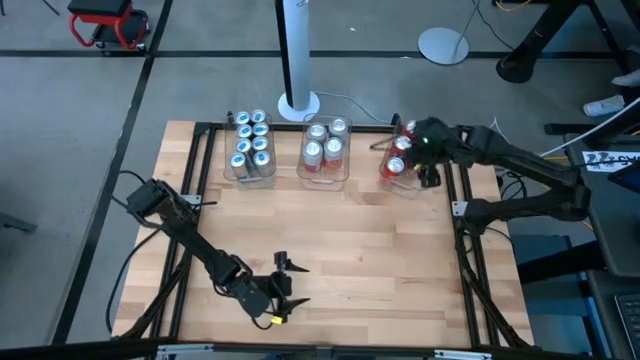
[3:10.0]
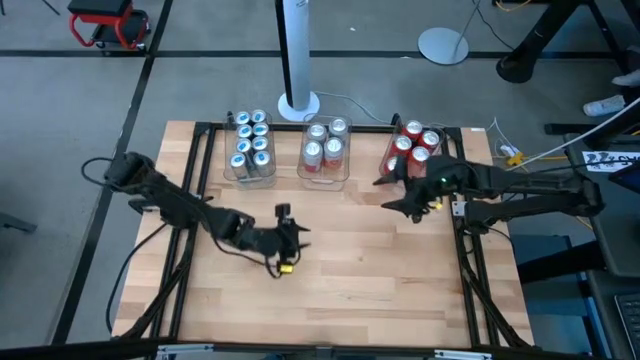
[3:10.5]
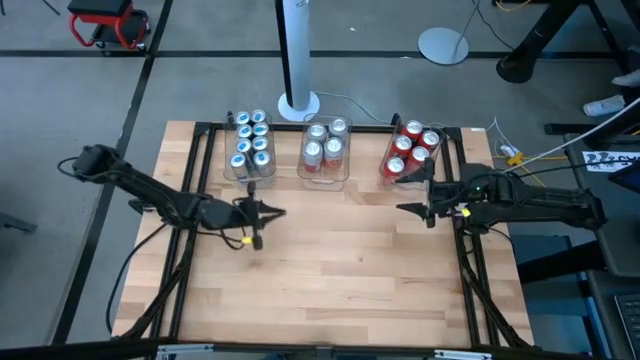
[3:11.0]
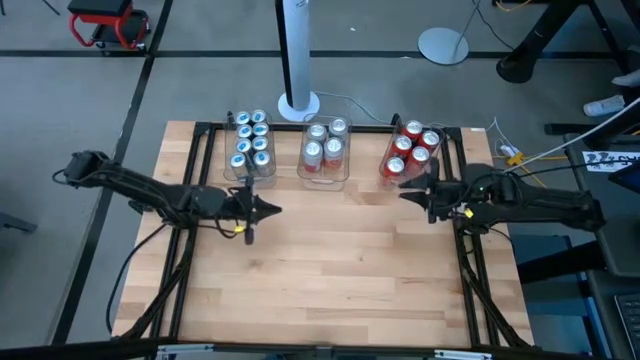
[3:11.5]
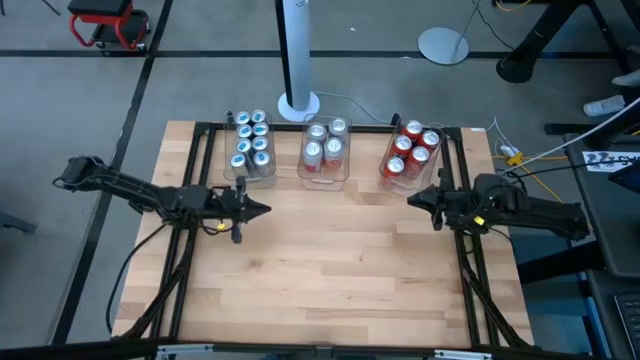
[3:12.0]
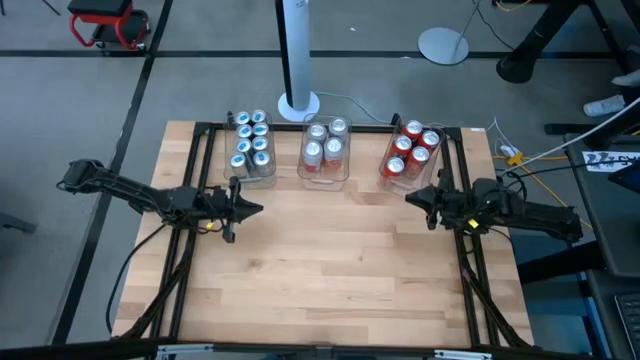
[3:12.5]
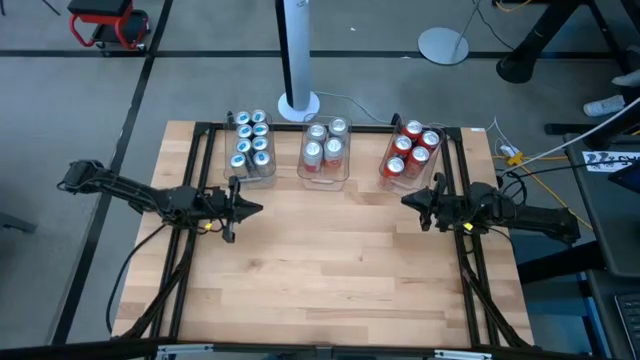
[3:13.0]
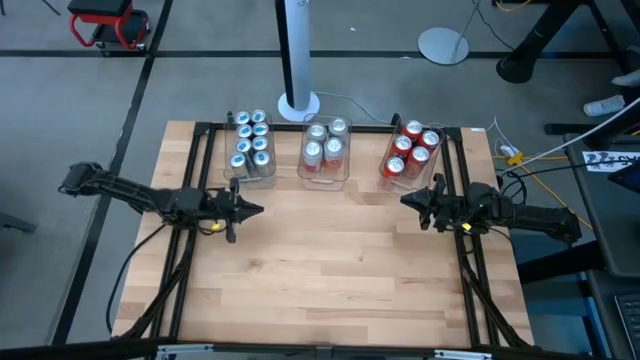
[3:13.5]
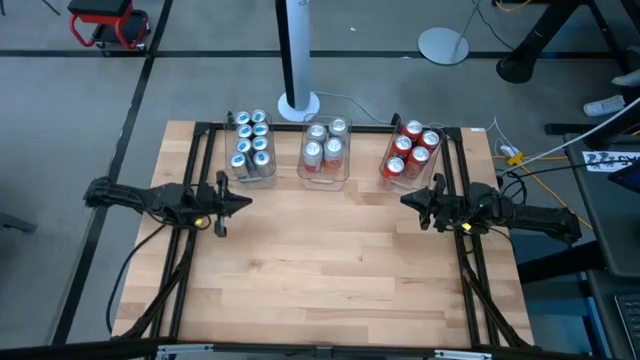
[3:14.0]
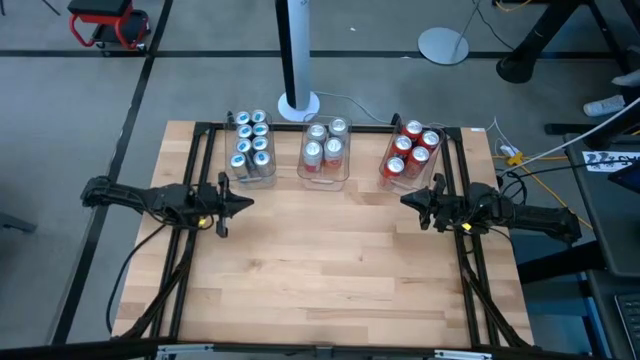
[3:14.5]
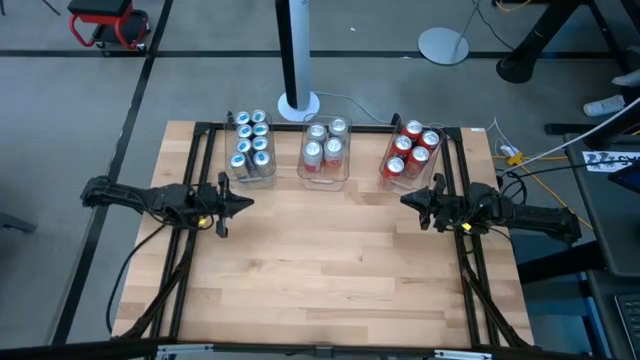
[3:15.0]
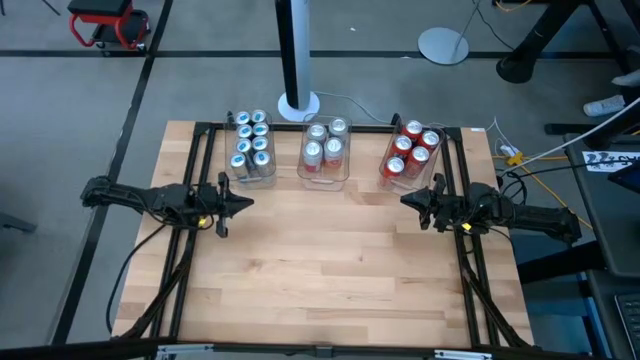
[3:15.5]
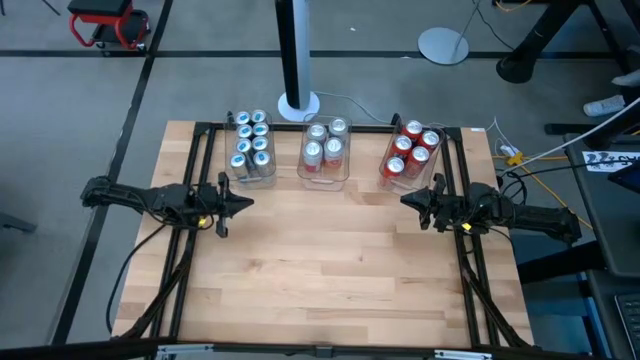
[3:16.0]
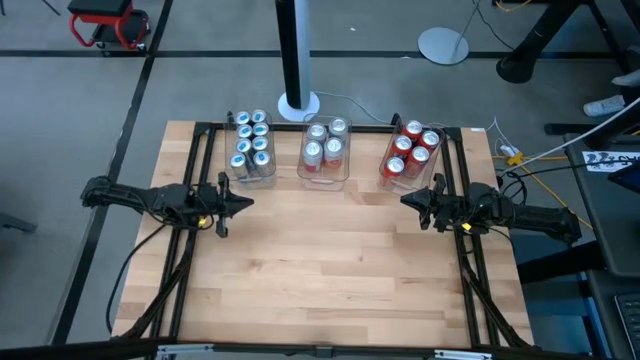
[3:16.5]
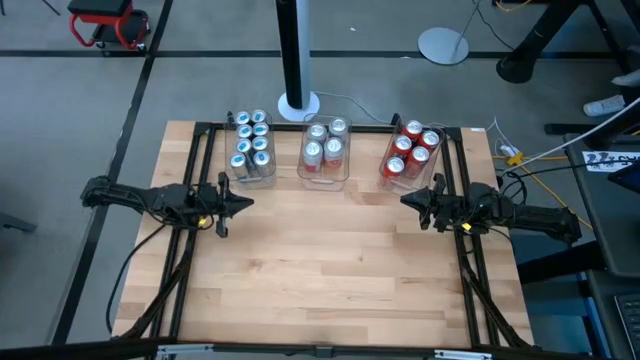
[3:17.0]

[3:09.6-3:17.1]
Task: Sort soda cans
Return to Home Position

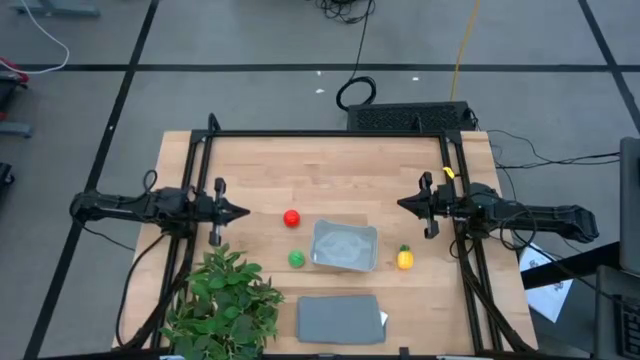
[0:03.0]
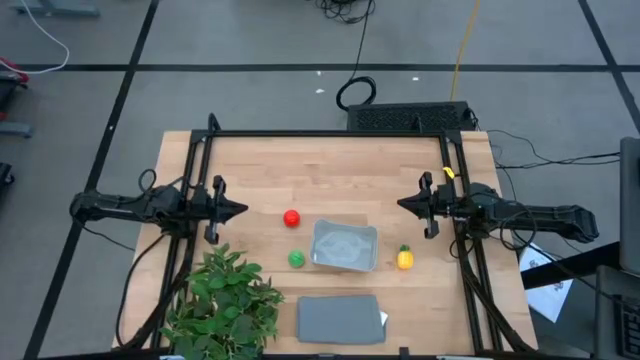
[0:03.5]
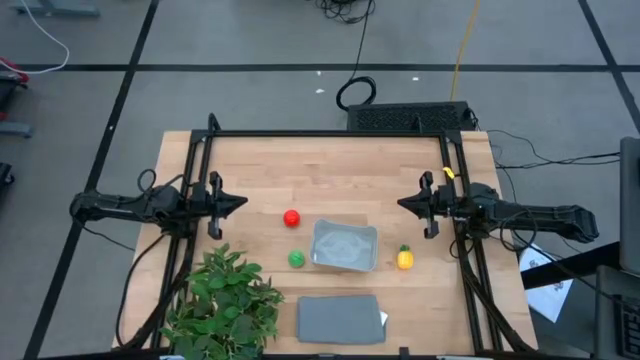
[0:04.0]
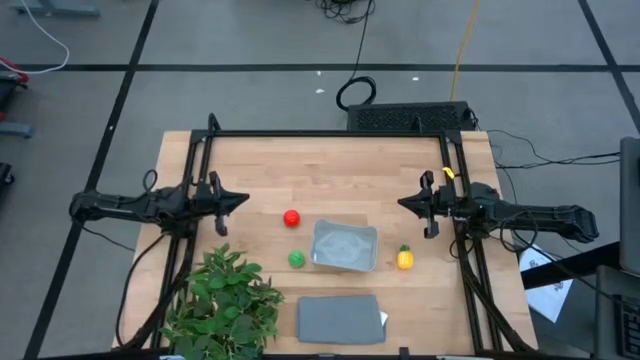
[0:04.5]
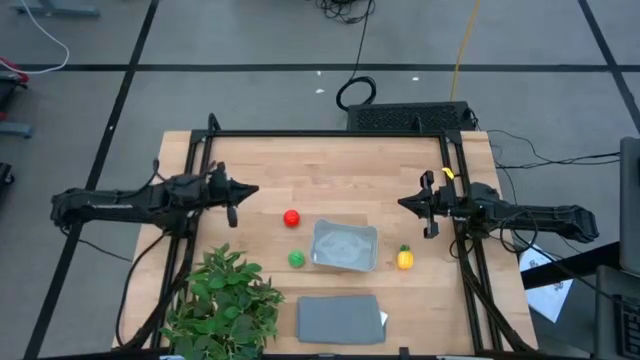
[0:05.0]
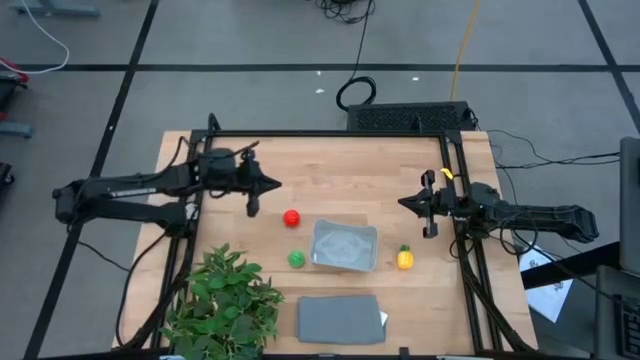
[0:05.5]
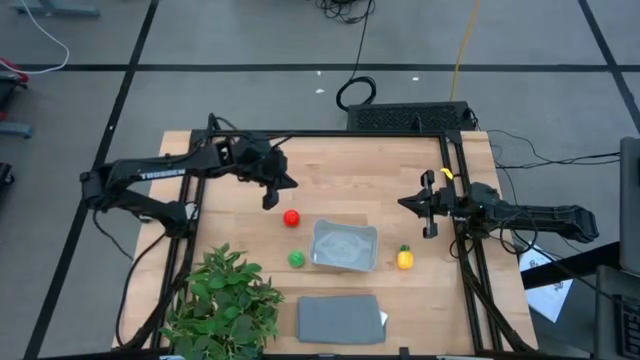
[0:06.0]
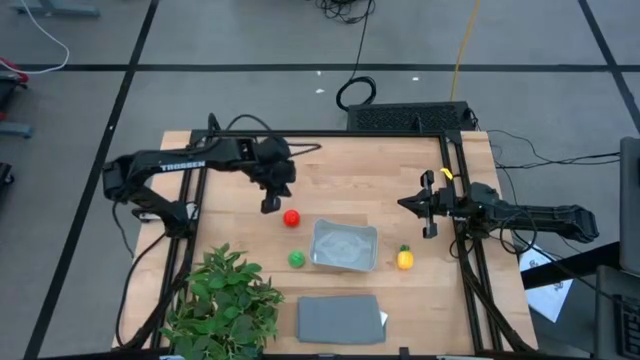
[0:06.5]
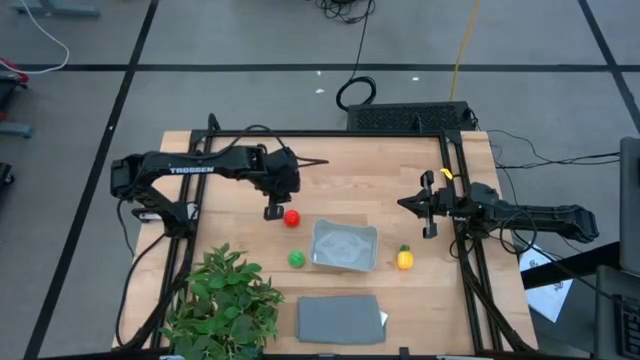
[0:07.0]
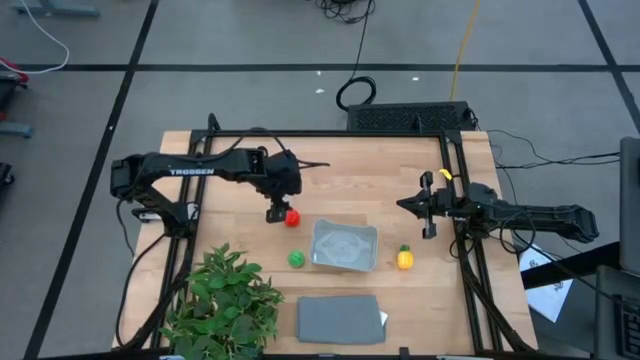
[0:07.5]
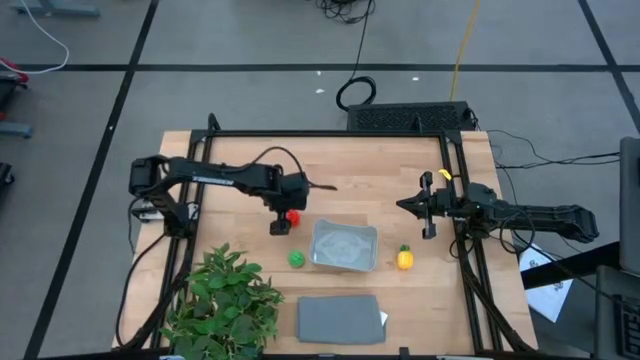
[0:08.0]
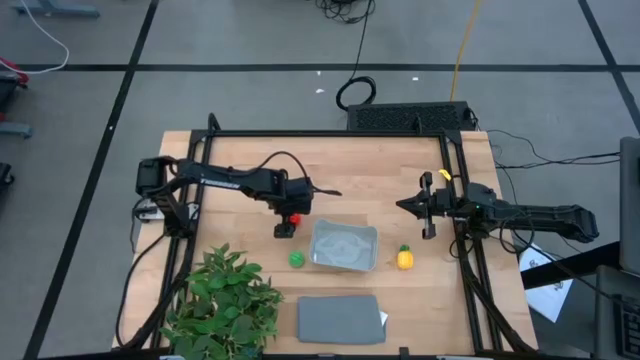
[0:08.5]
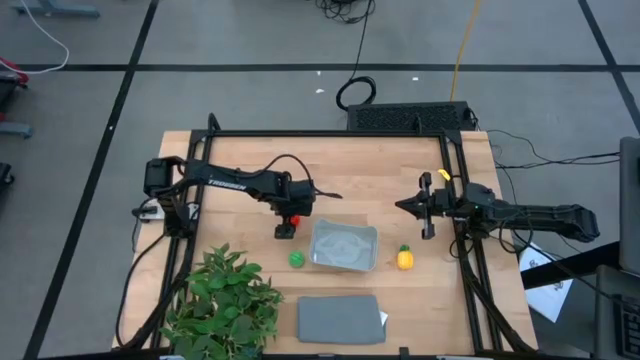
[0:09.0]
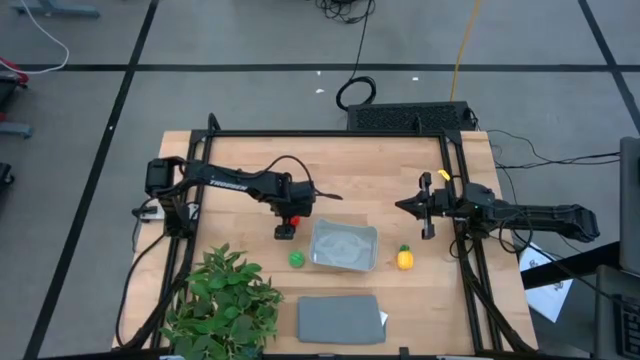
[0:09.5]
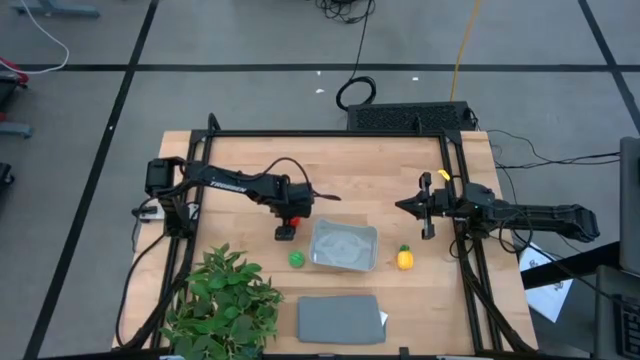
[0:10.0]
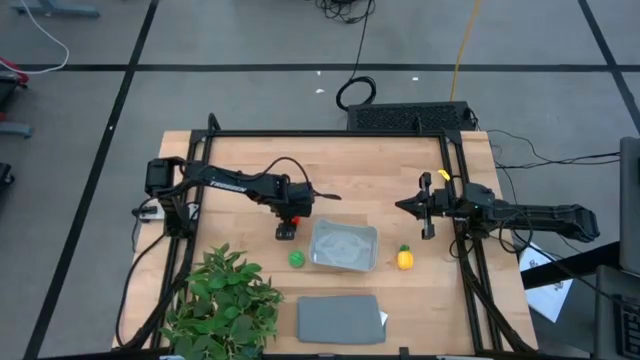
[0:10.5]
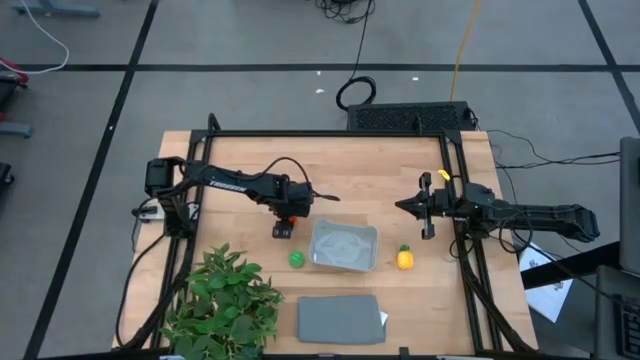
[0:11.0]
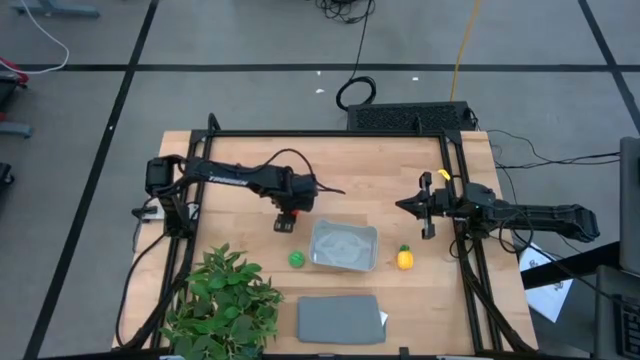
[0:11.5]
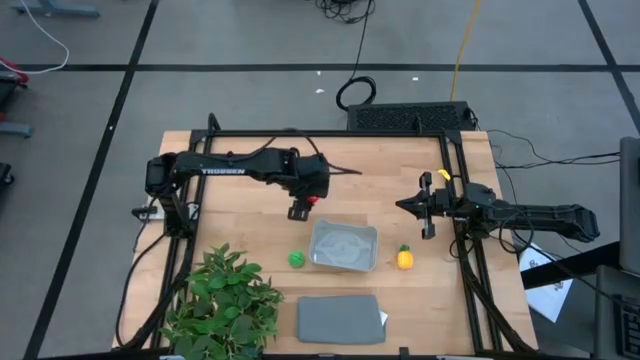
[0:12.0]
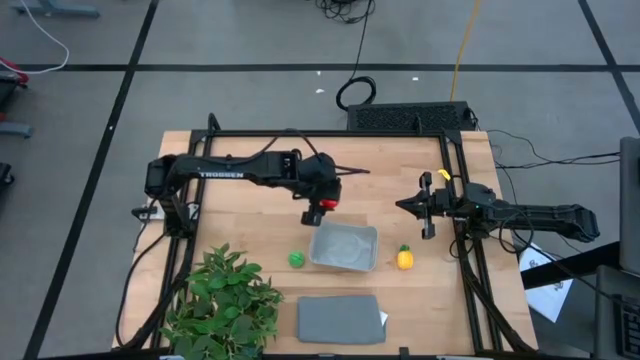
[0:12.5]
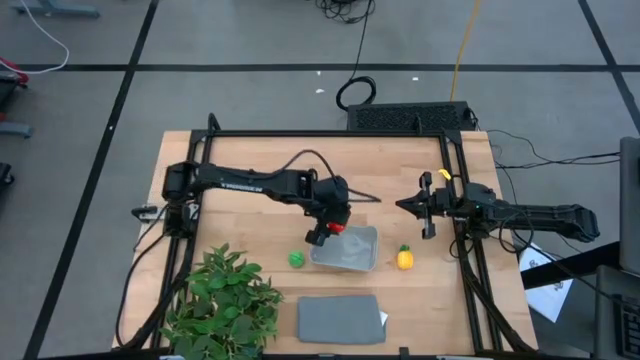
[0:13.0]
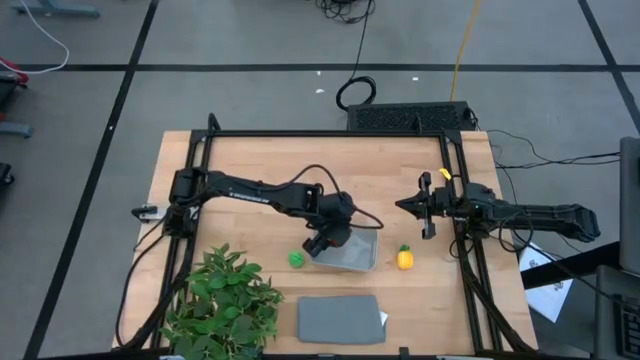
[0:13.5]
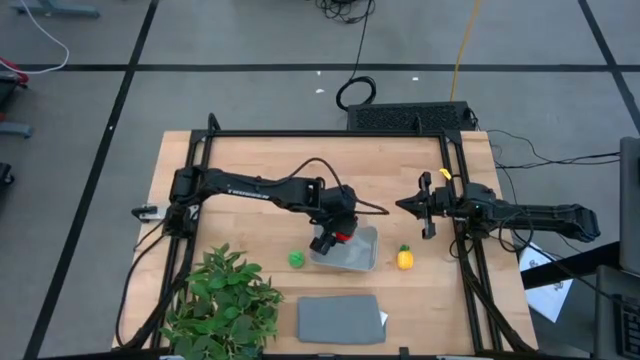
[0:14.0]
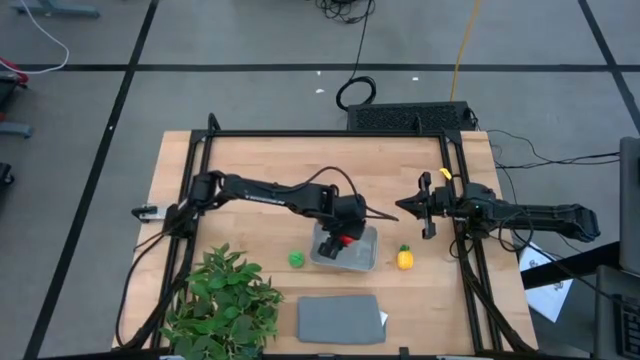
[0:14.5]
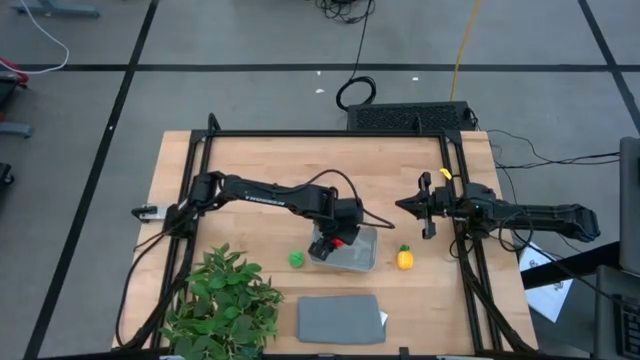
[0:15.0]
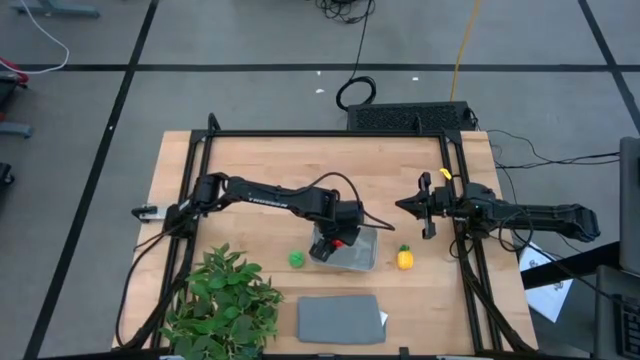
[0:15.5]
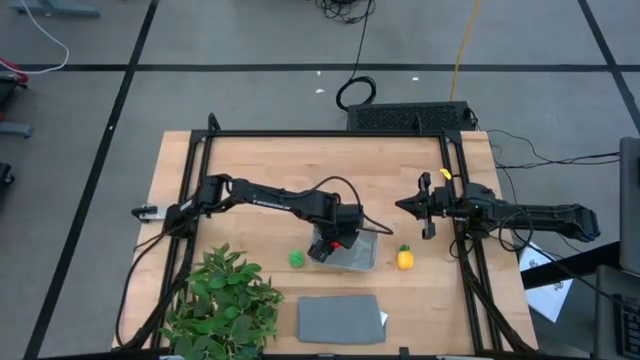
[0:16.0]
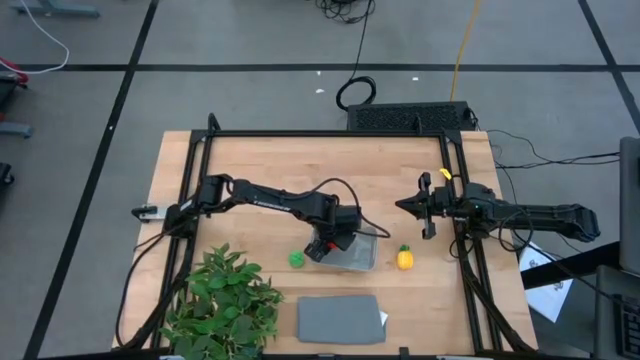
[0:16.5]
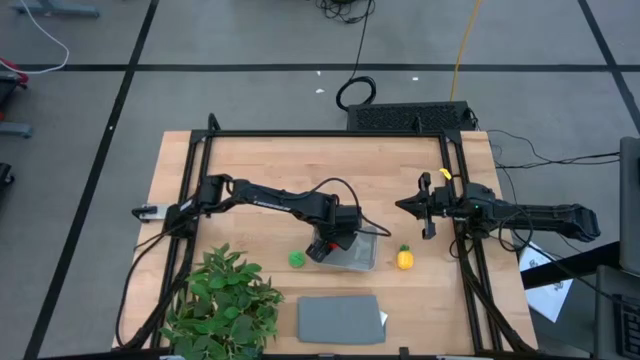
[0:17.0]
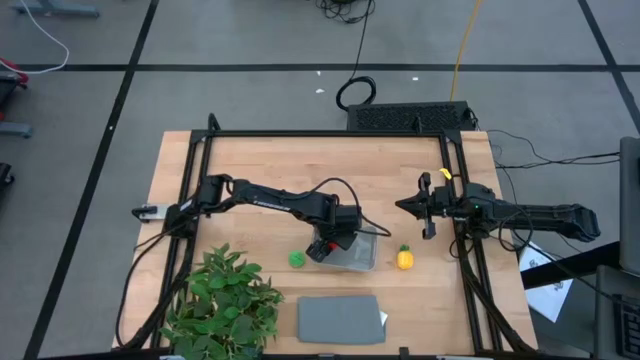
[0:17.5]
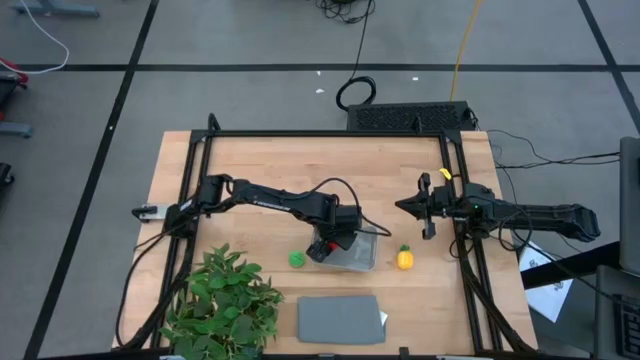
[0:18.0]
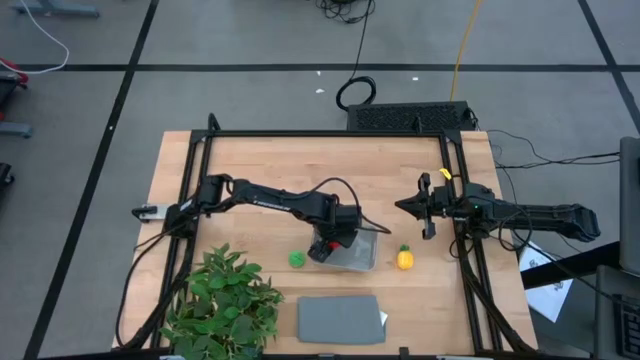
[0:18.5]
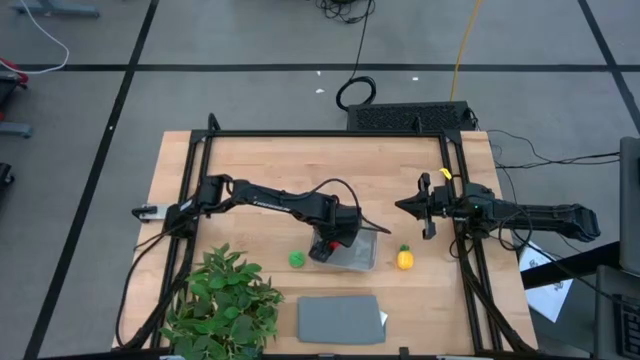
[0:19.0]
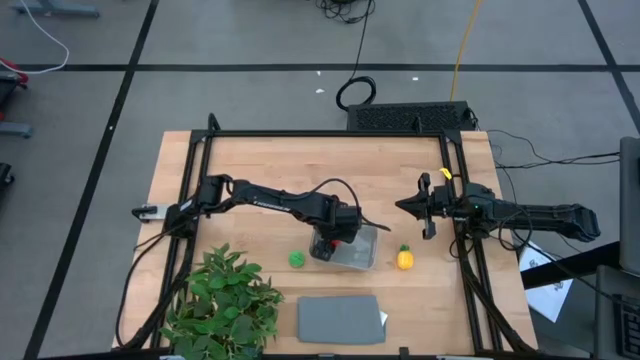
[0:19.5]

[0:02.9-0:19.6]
Task: Pick and placing Produce into tupperware
Put the red tomato into the gray bin
